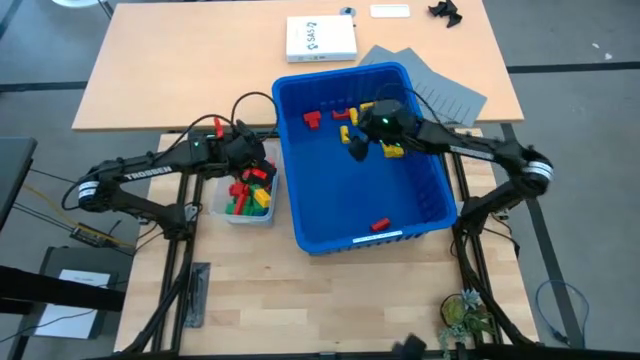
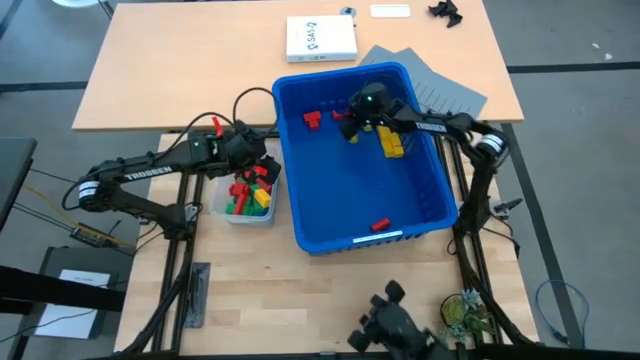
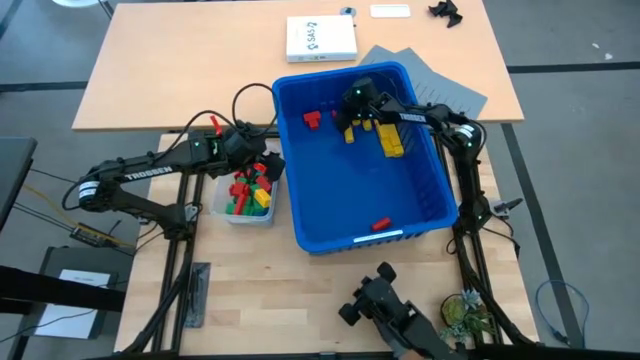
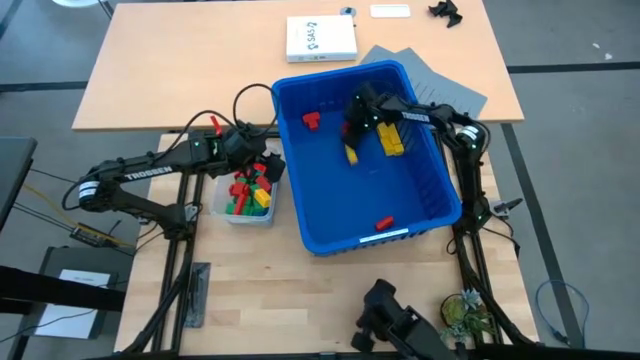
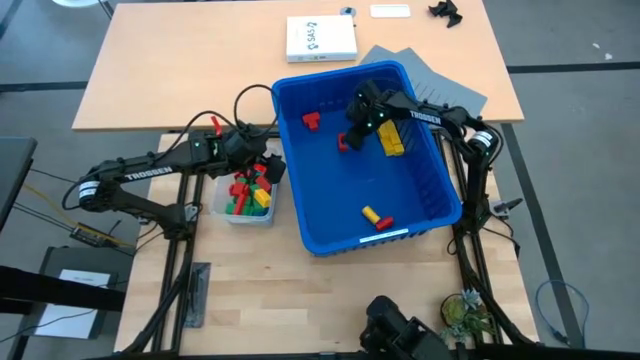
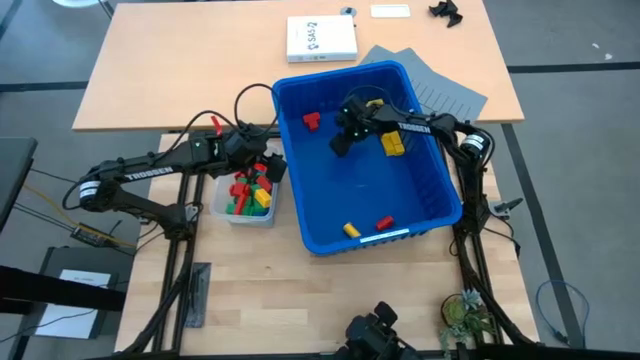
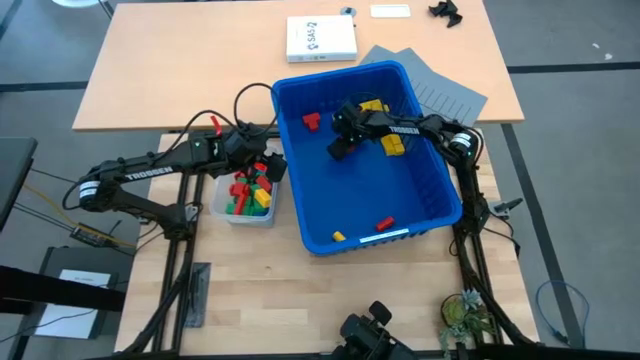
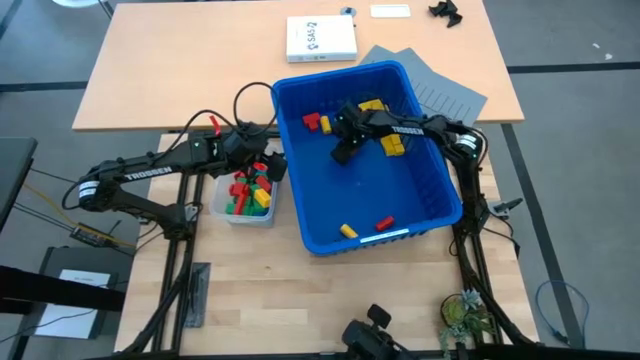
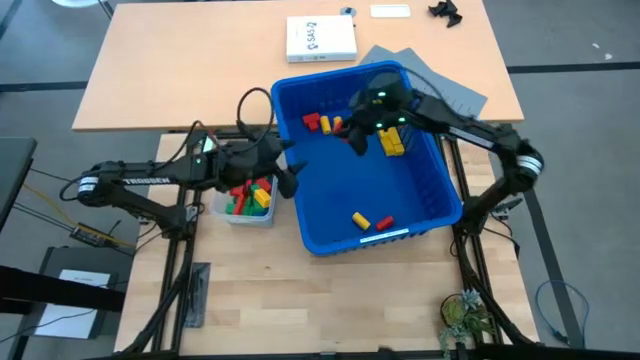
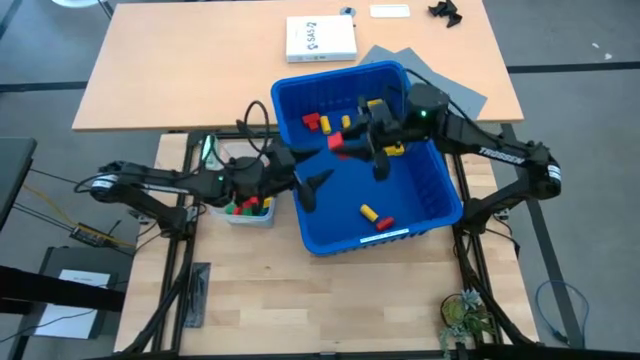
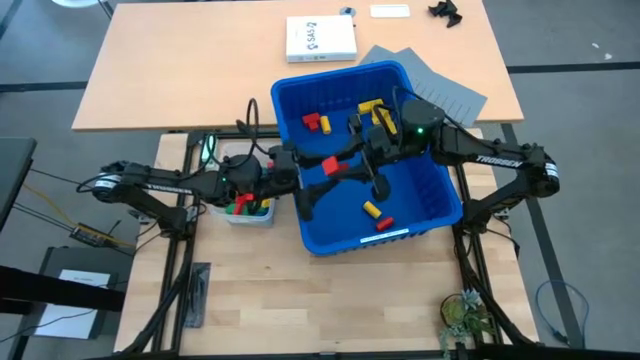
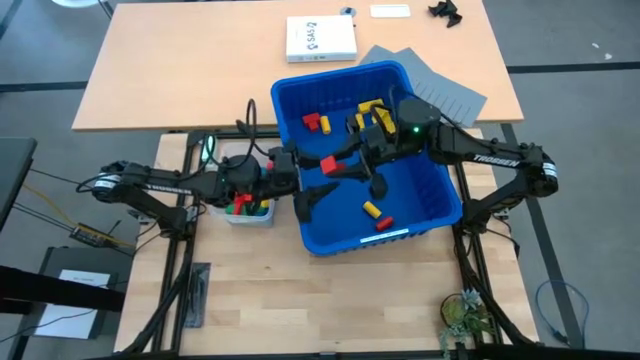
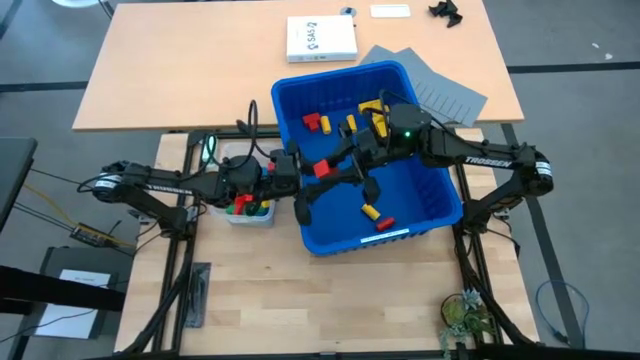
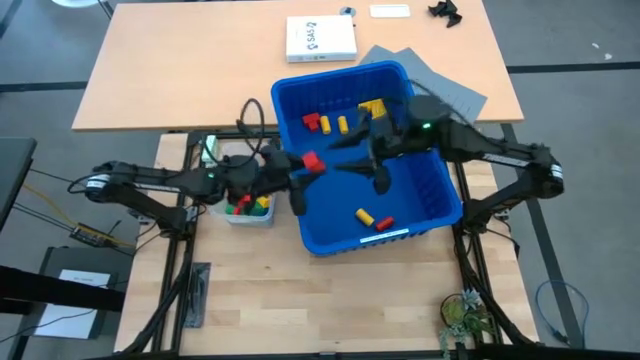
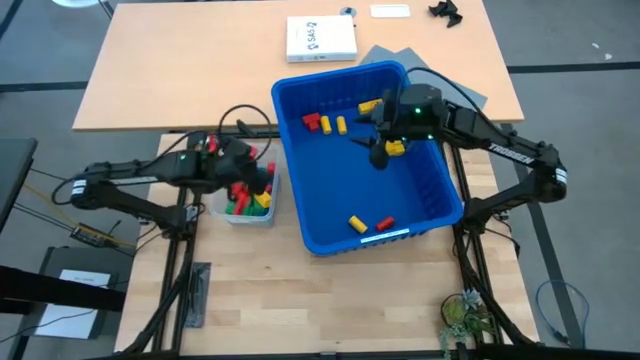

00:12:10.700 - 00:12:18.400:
Task: Sort blocks
Put the red block into the transparent bin

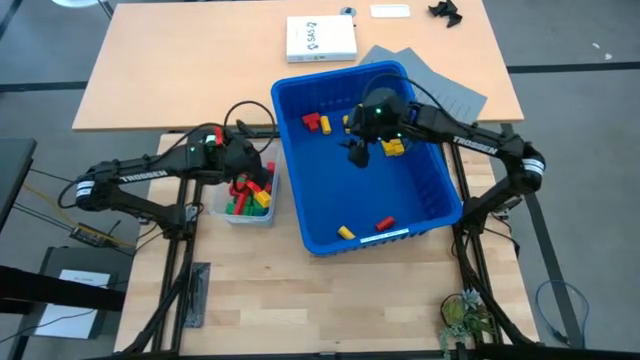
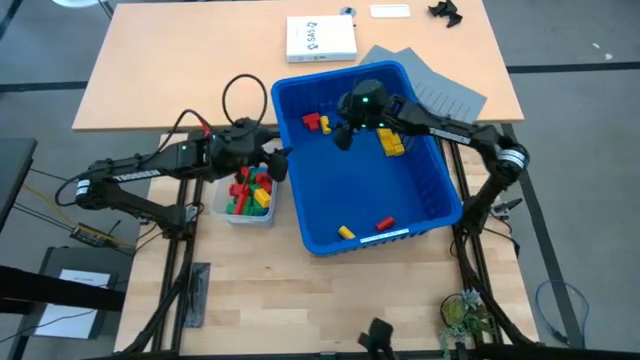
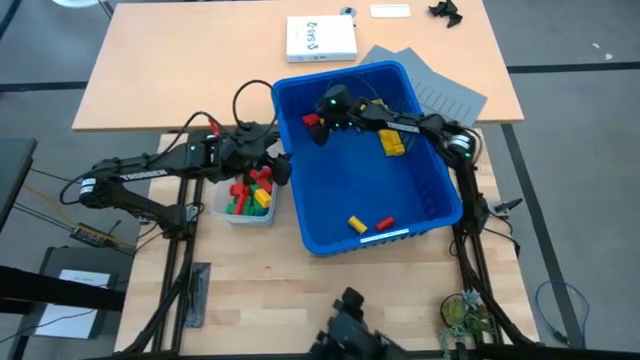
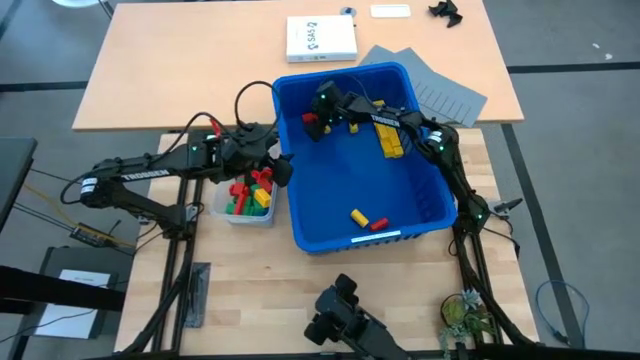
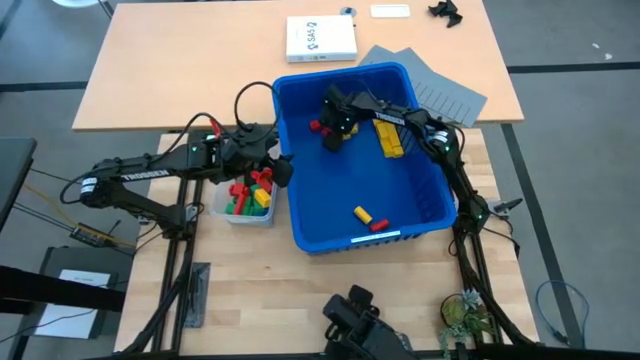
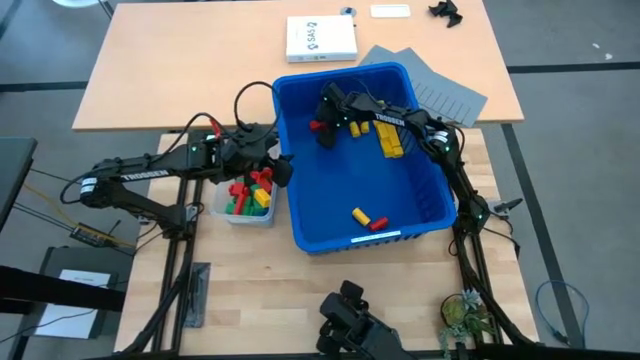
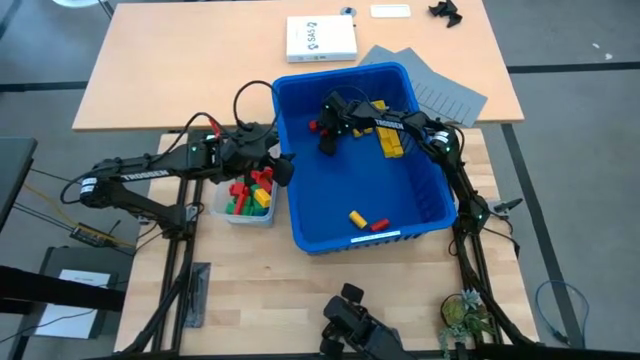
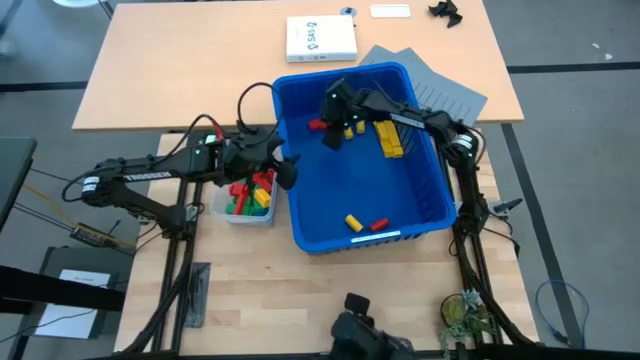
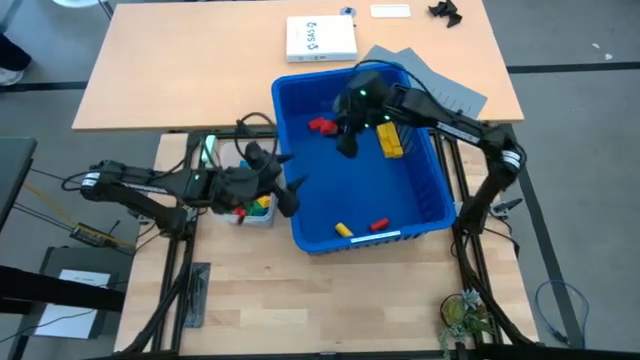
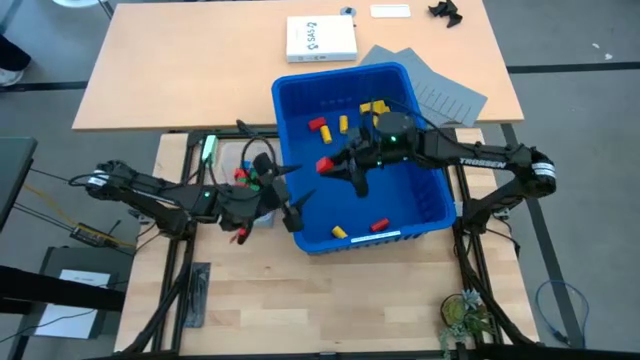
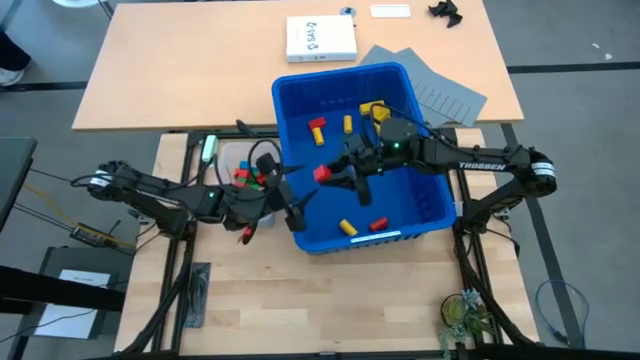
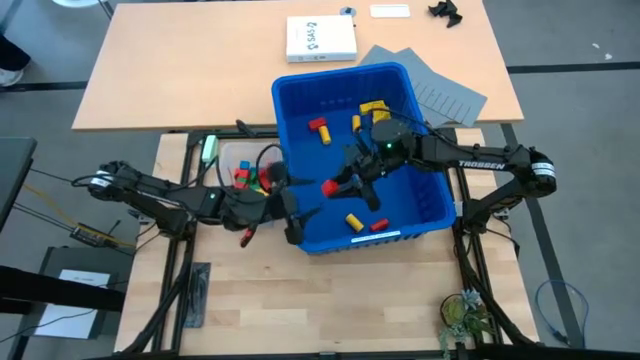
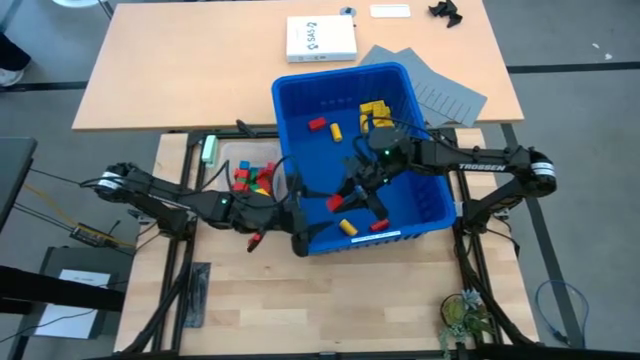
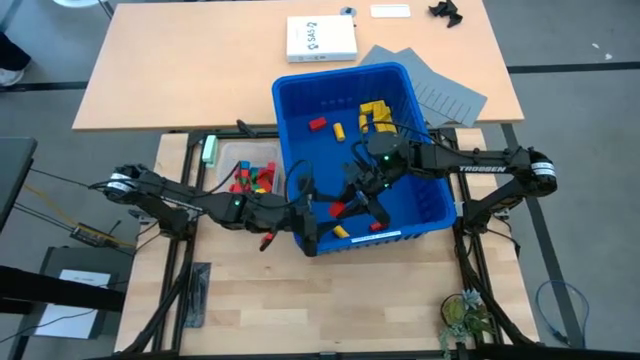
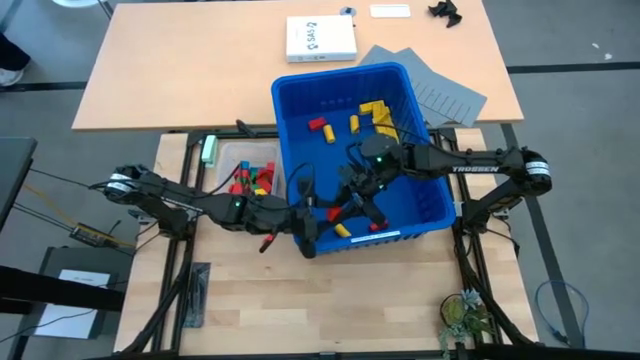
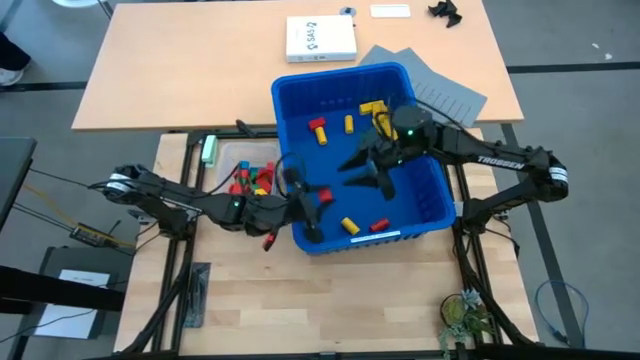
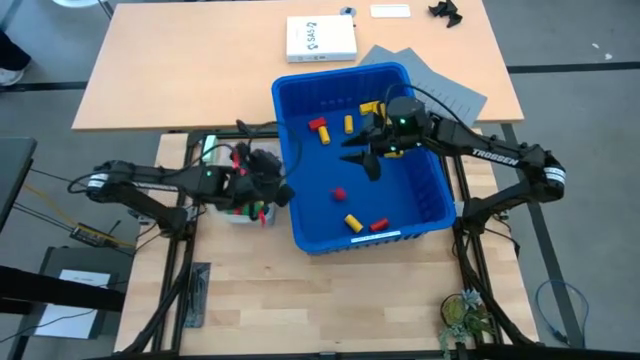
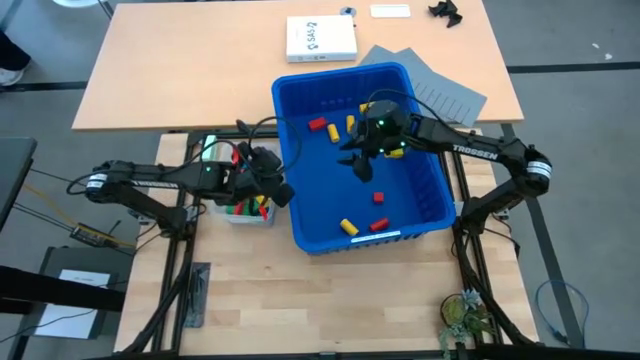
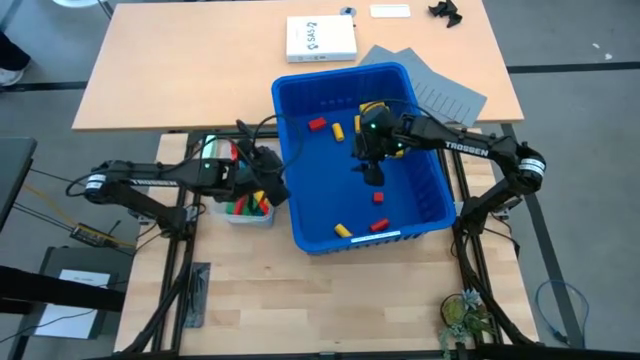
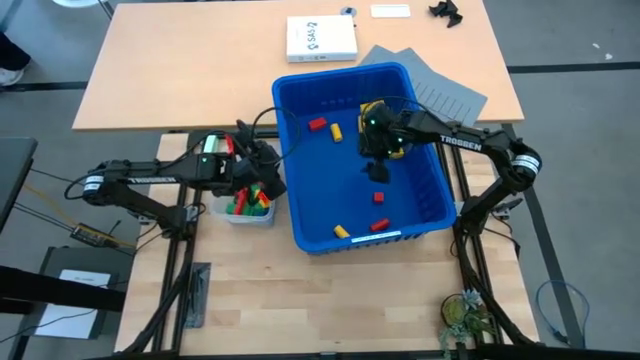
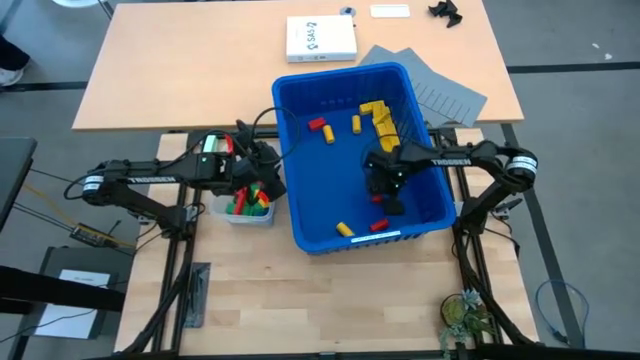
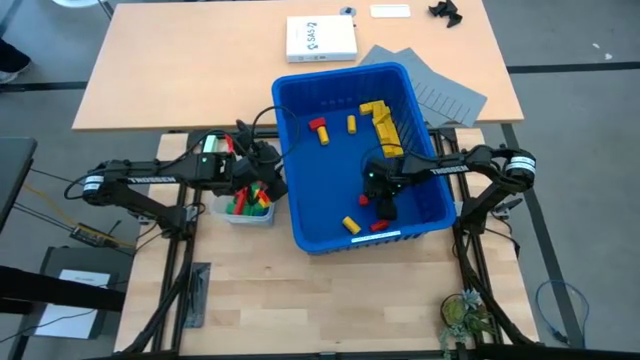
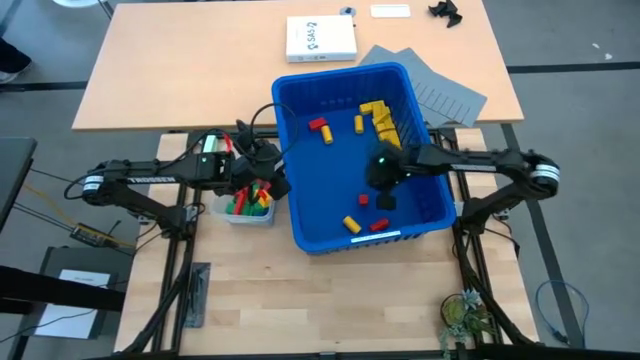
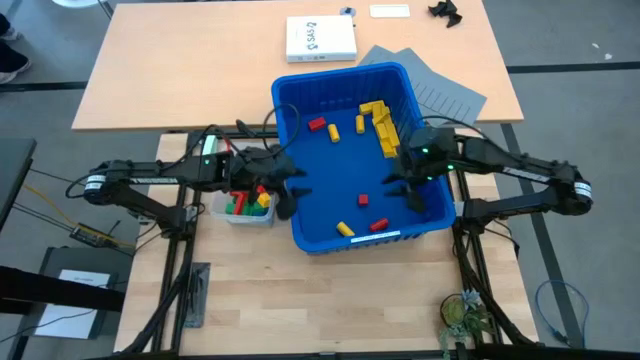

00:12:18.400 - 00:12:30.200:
Put the red block into the transparent bin

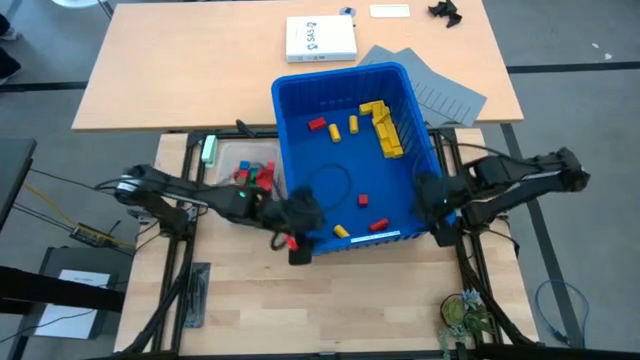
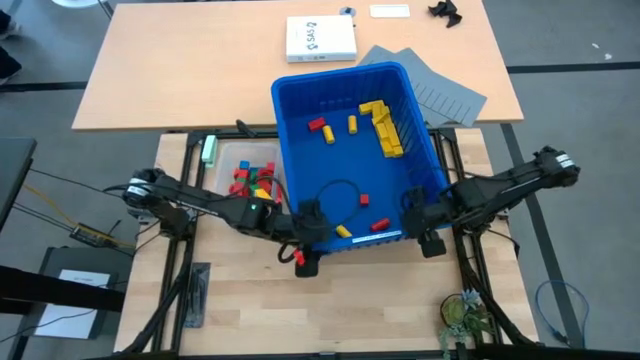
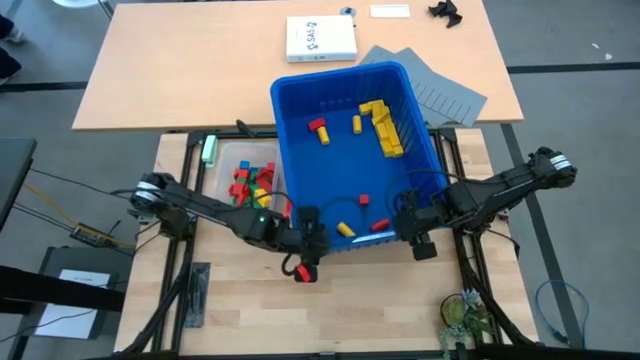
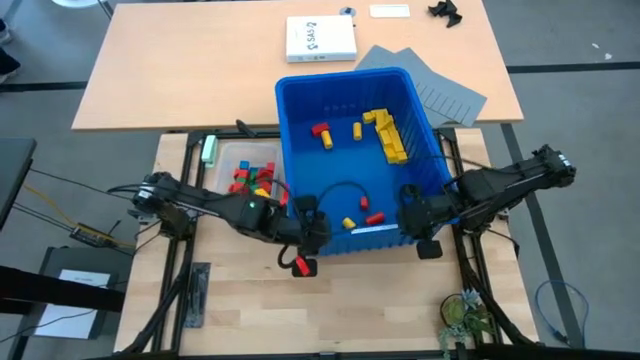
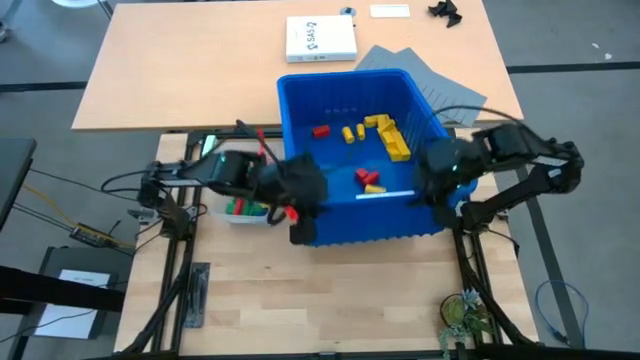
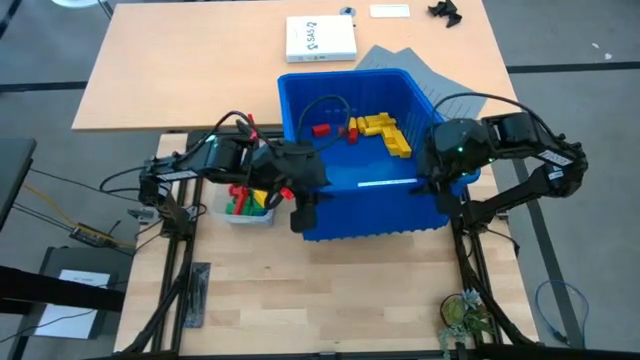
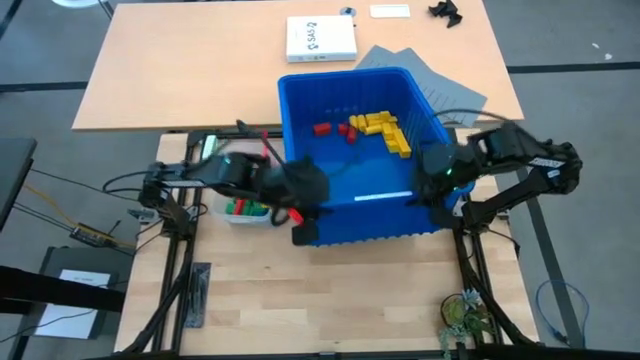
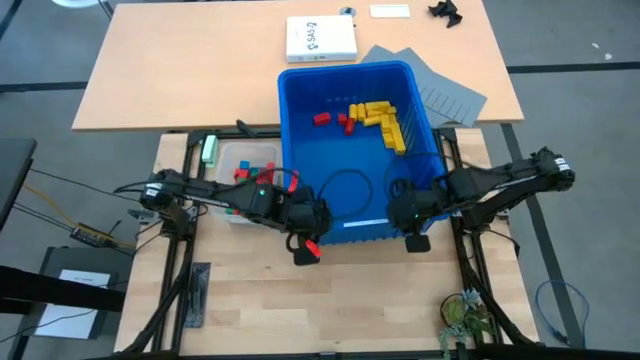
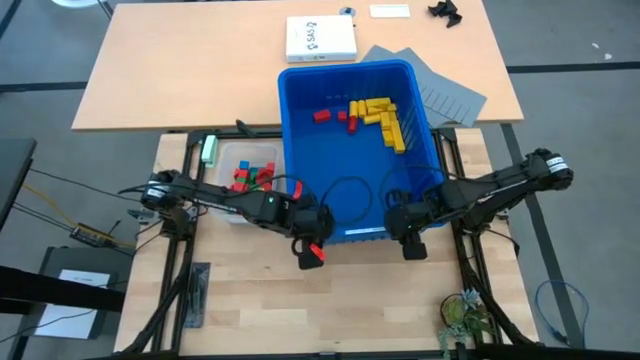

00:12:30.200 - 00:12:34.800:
Adjust the blue bin
